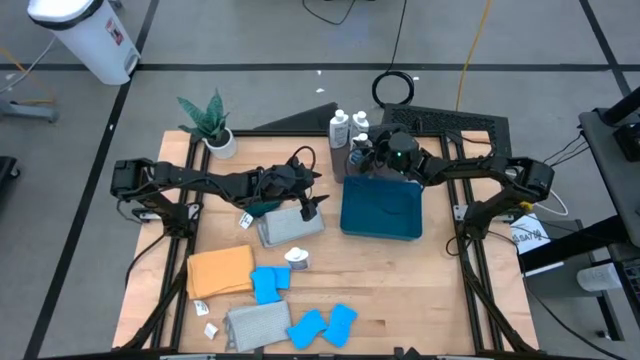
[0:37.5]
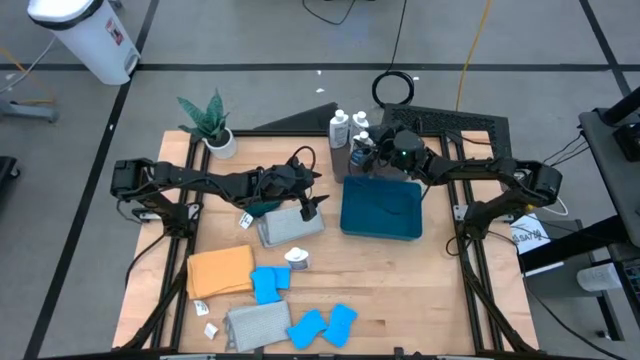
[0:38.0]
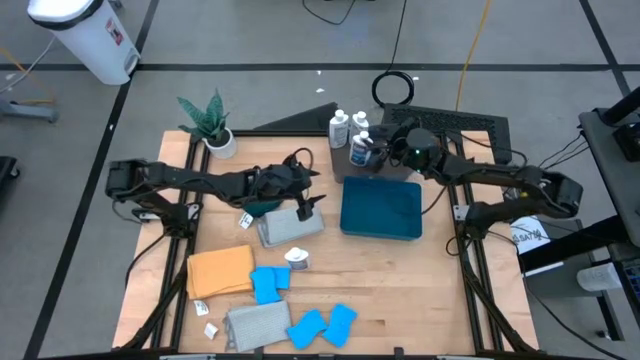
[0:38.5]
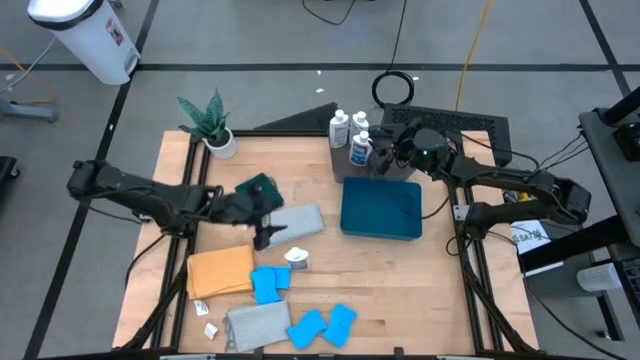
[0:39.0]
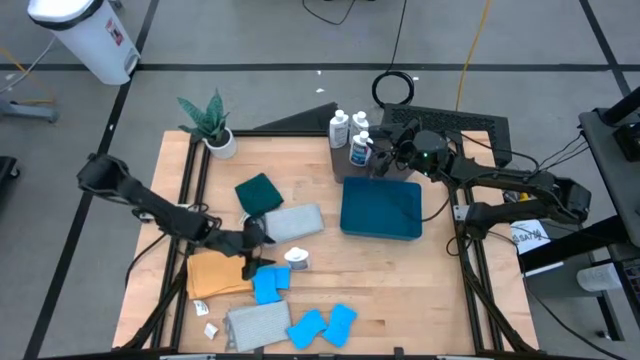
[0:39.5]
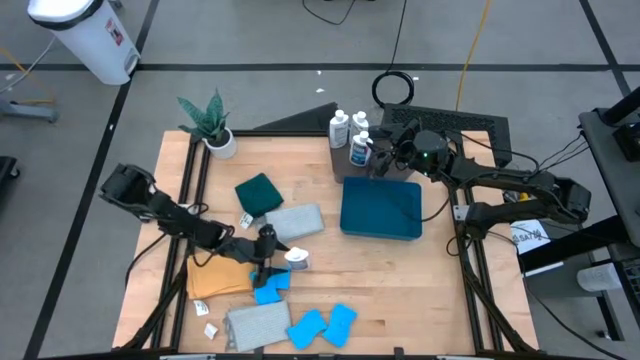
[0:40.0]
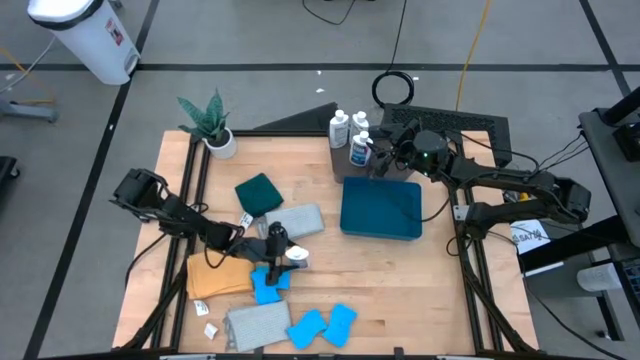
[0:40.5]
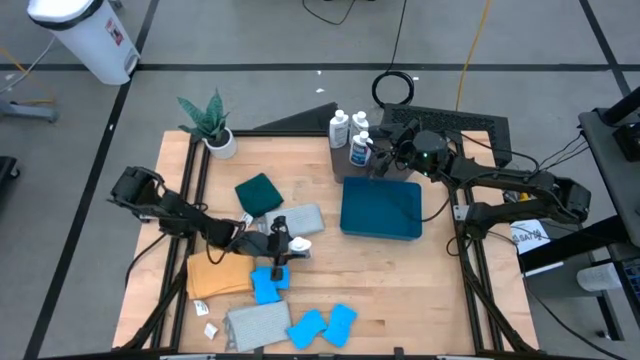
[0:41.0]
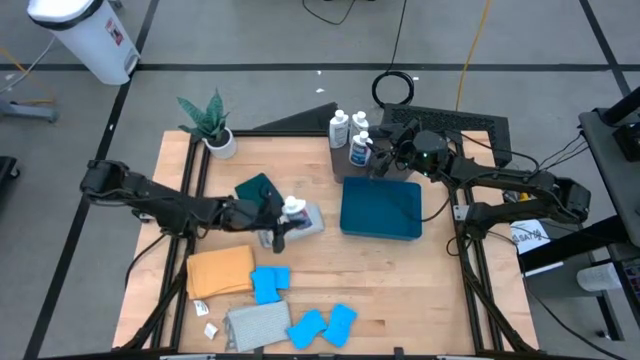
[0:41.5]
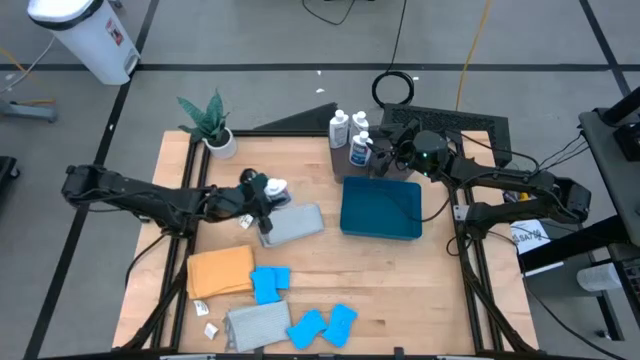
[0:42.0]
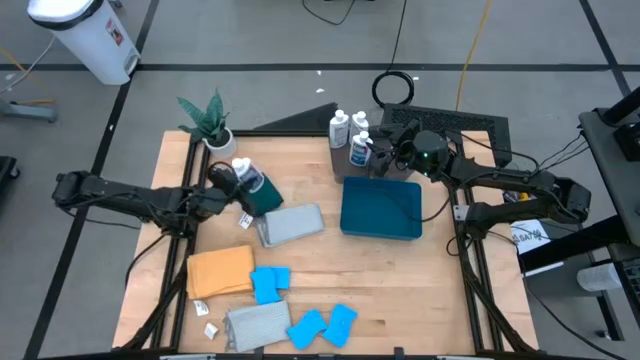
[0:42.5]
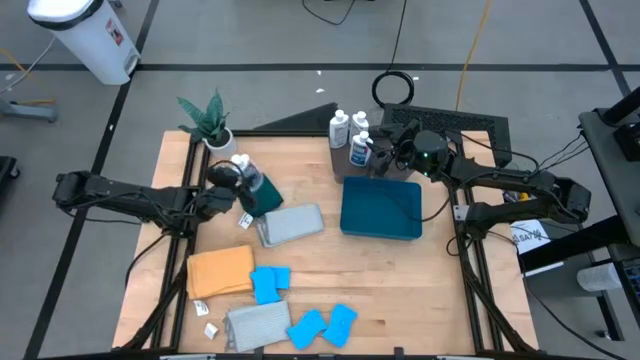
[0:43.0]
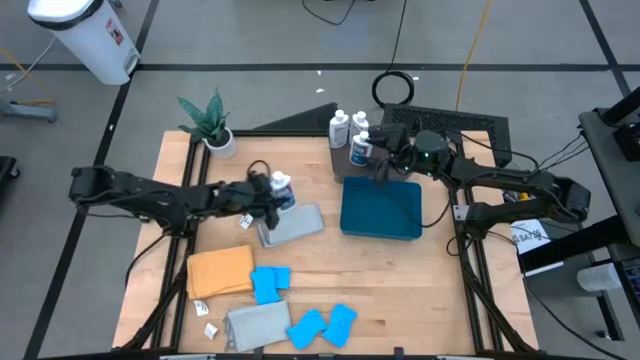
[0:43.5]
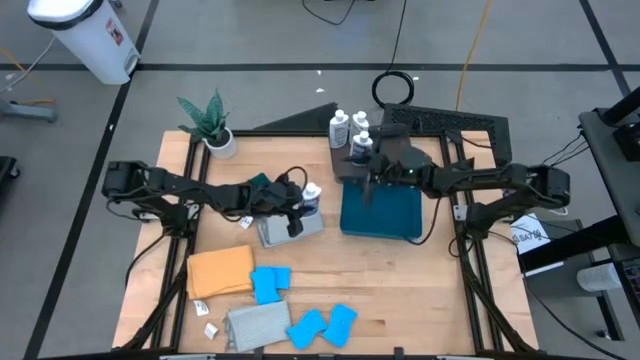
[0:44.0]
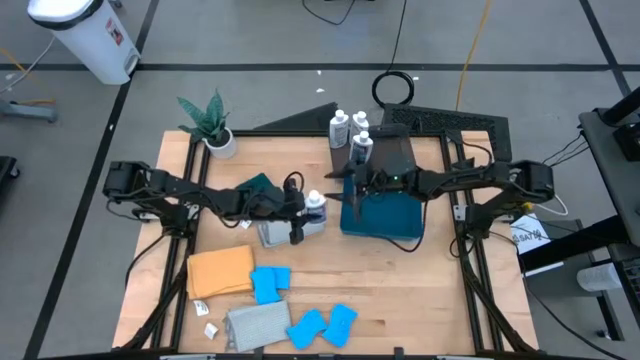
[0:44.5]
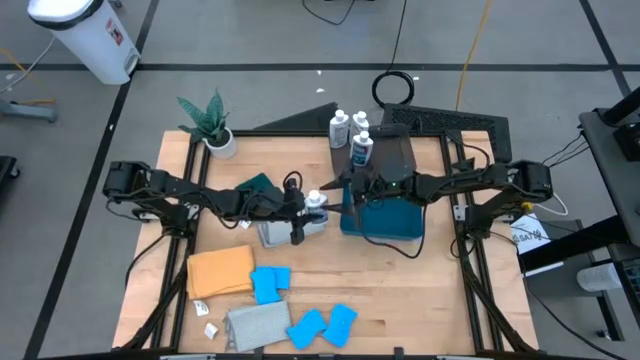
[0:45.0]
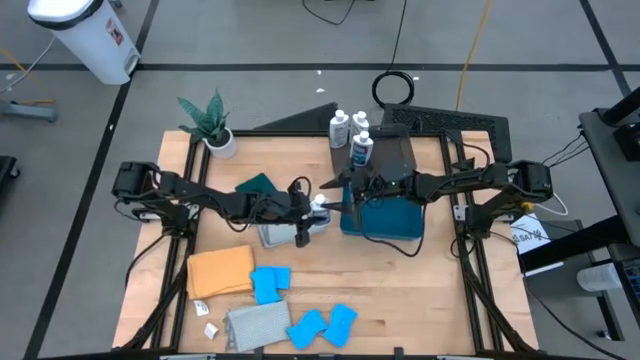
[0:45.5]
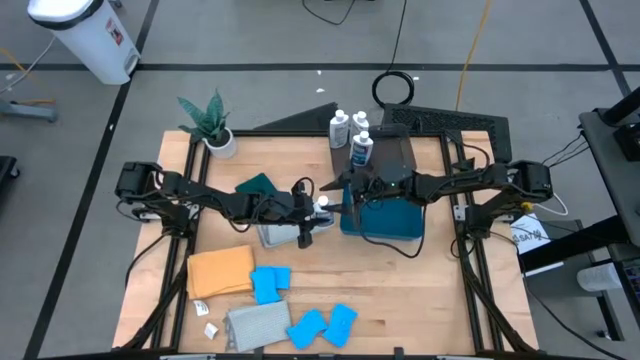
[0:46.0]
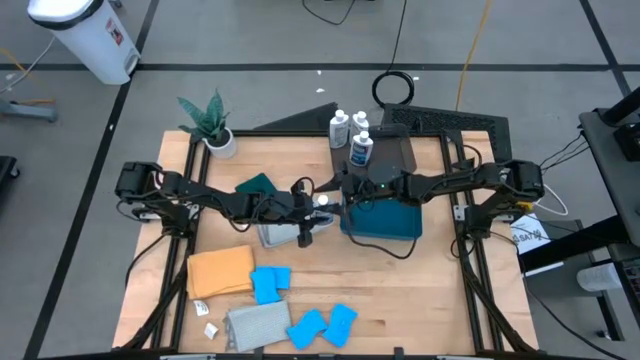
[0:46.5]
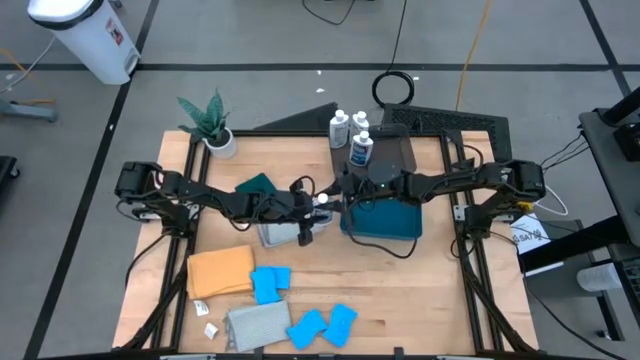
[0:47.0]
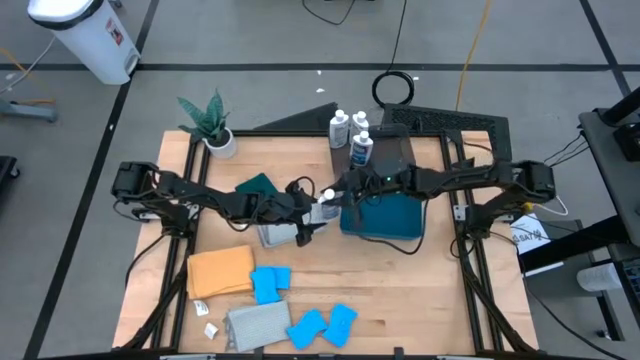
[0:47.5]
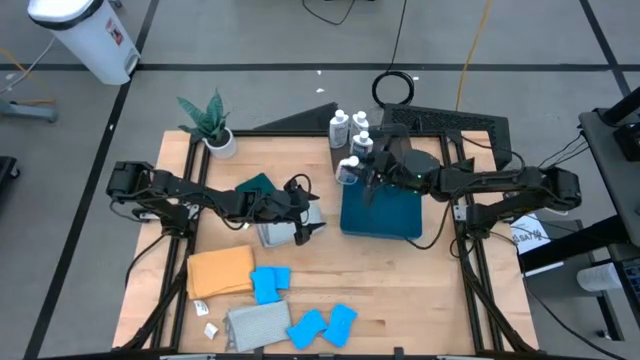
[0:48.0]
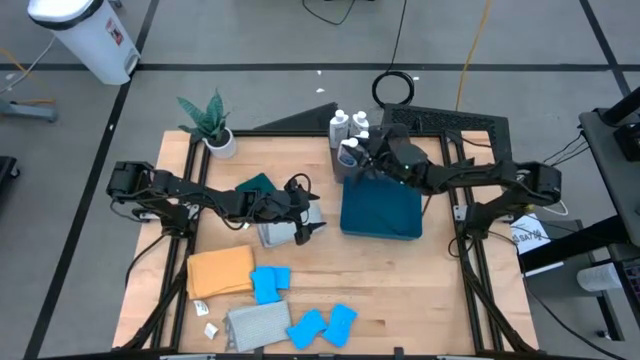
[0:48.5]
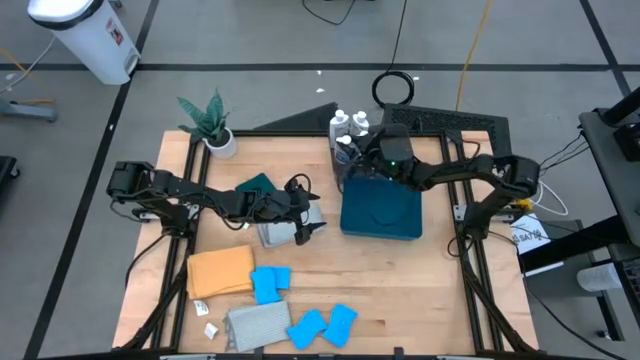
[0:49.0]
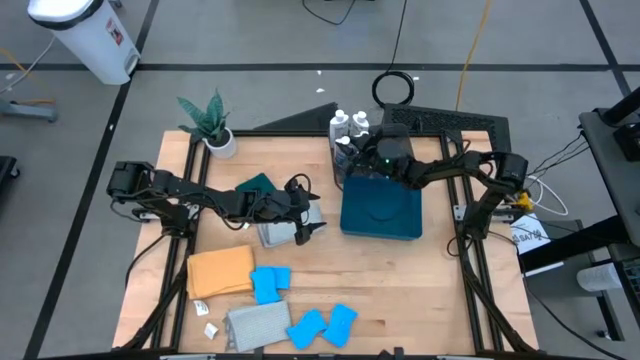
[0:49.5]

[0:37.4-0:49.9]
Task: Pick & Place Kitchen Items
Put the white clear plastic restorer into the left black bin

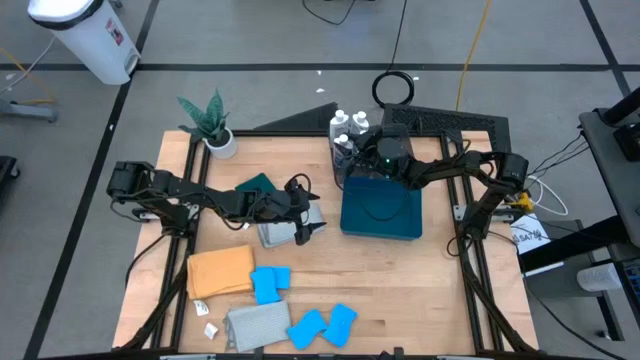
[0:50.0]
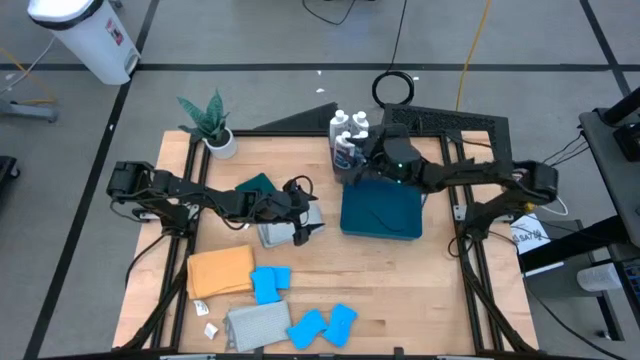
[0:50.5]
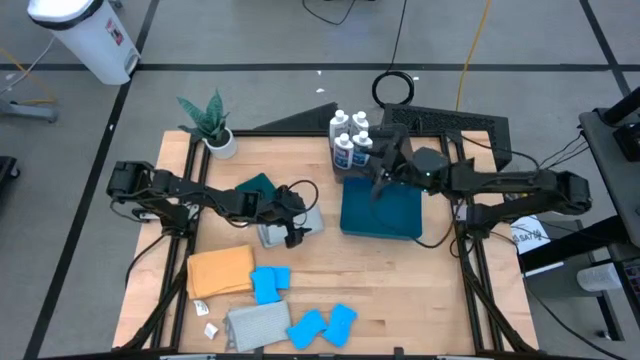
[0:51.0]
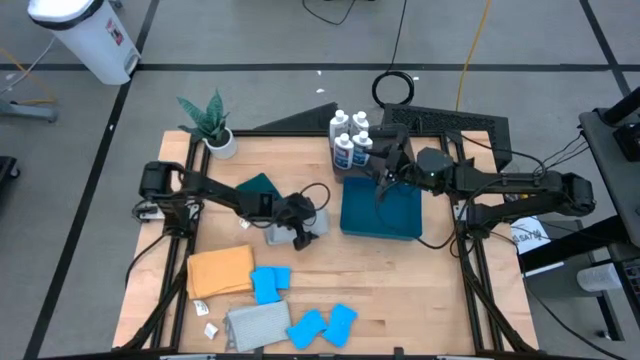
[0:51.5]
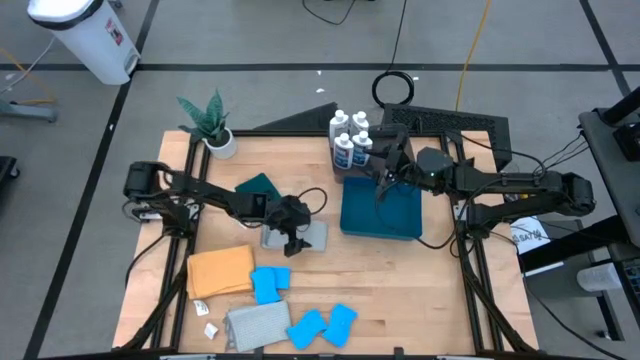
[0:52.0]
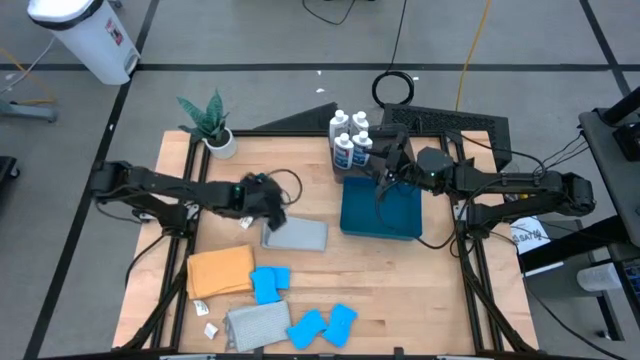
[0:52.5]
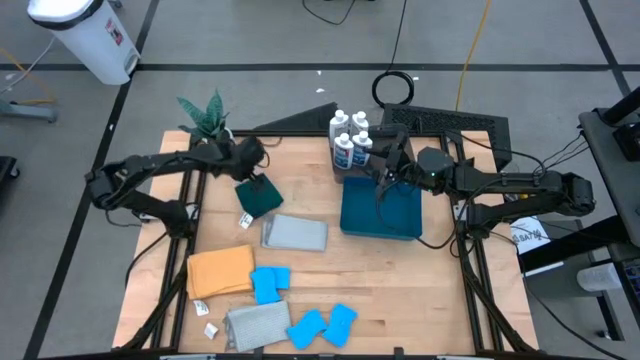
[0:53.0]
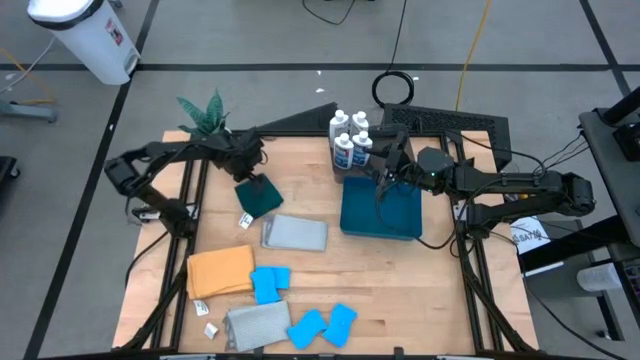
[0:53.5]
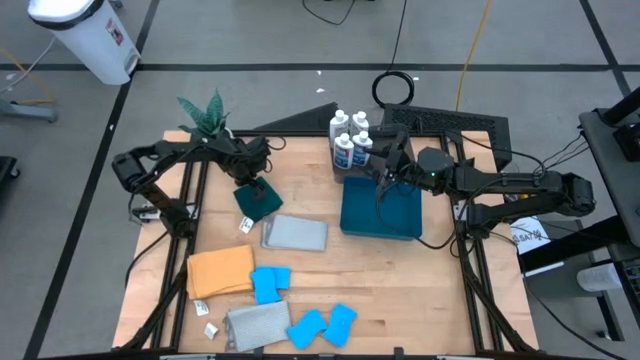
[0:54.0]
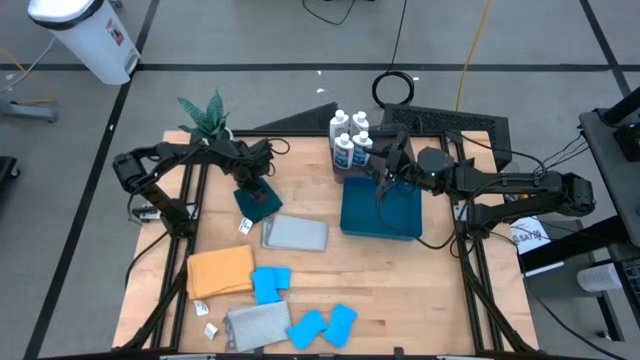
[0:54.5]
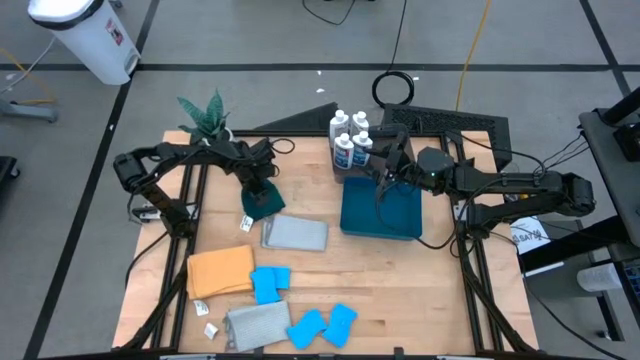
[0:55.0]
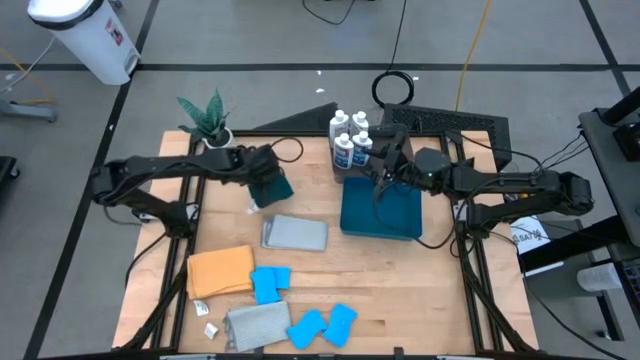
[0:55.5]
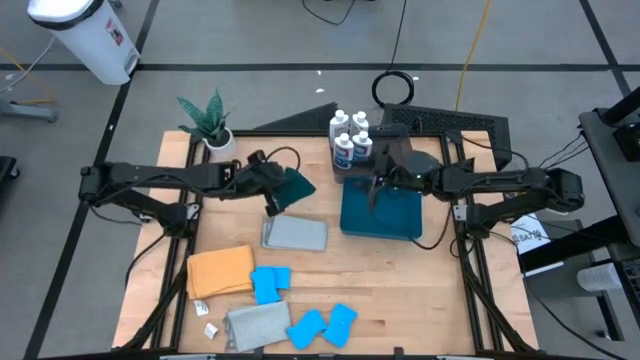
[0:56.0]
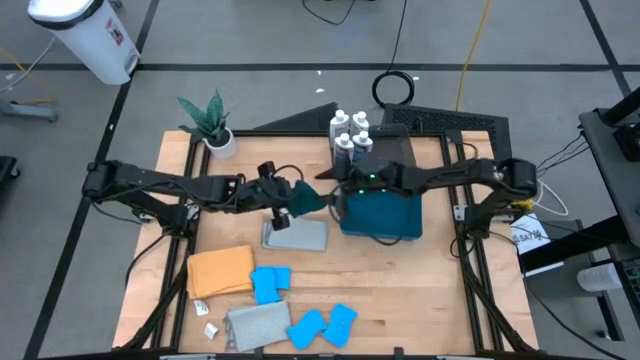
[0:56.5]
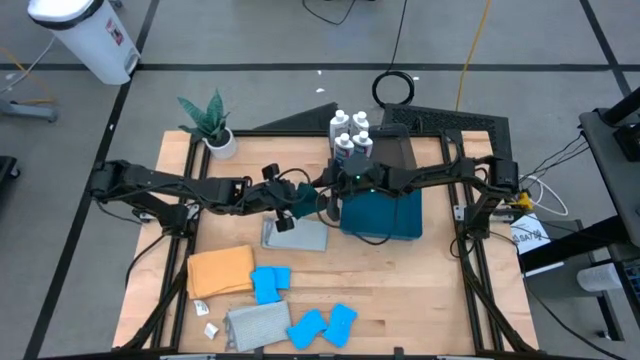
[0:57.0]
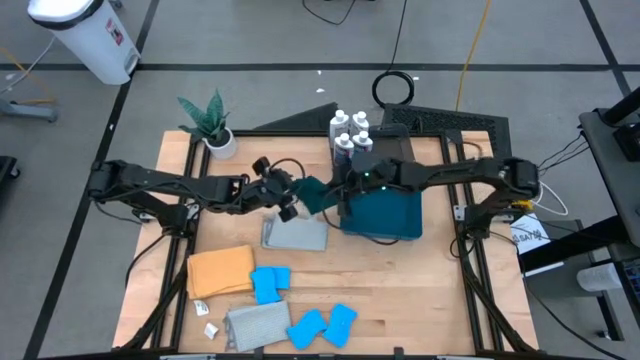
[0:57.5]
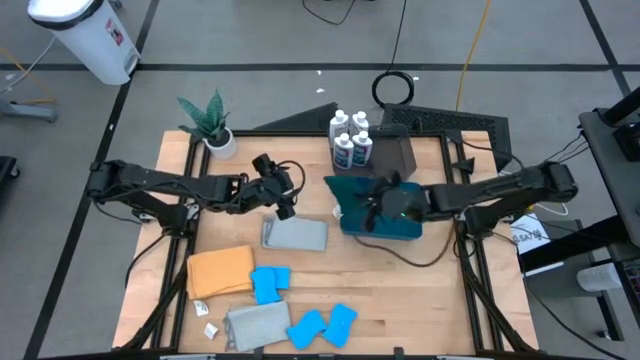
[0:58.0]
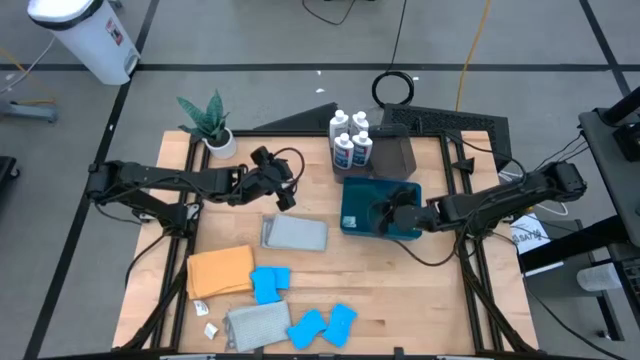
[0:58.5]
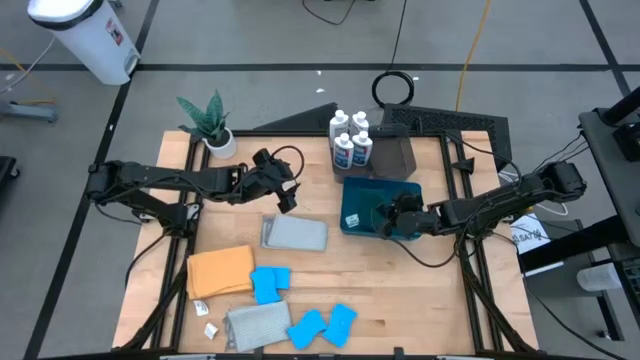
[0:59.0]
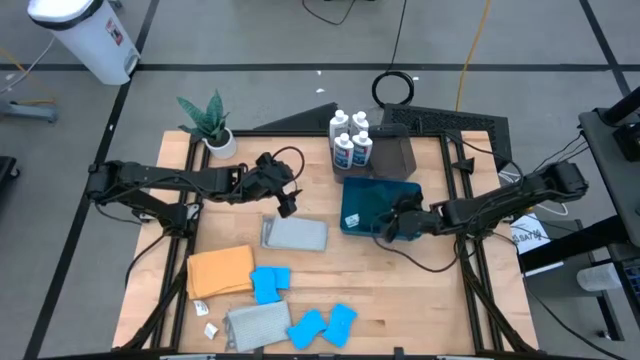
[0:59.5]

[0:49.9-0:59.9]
Put the dark blue napkin into the blue bin
